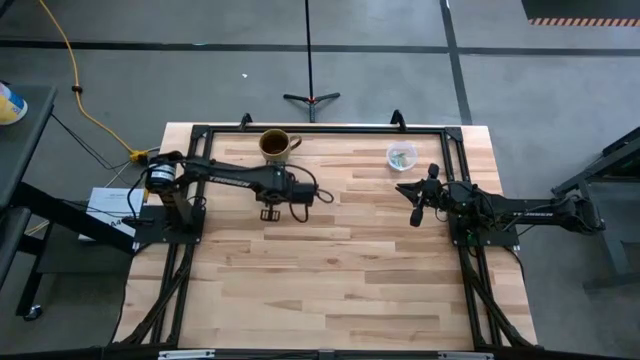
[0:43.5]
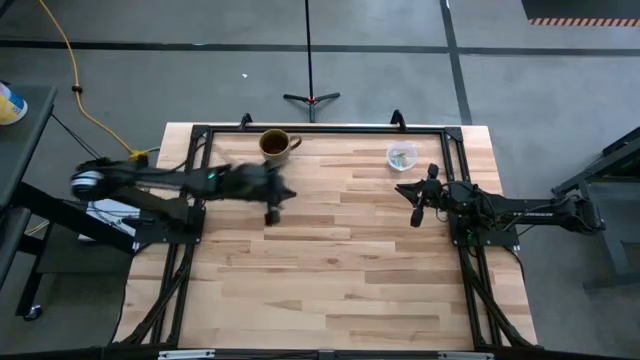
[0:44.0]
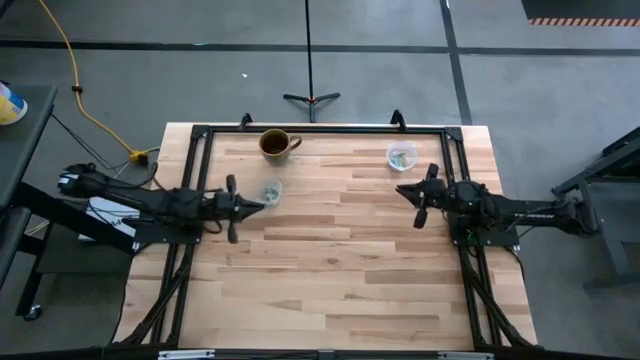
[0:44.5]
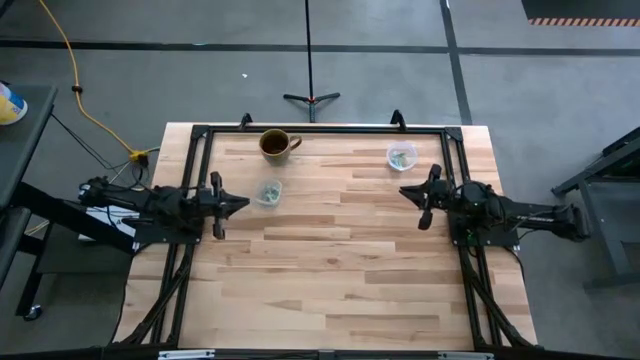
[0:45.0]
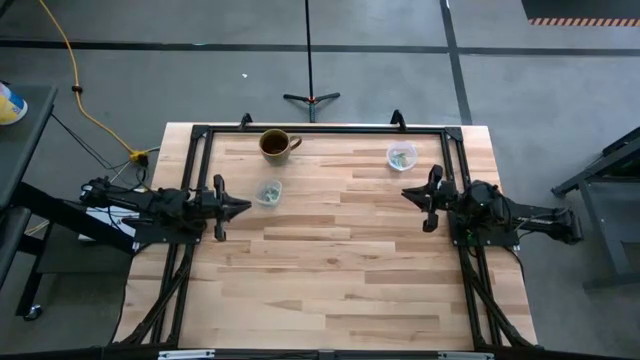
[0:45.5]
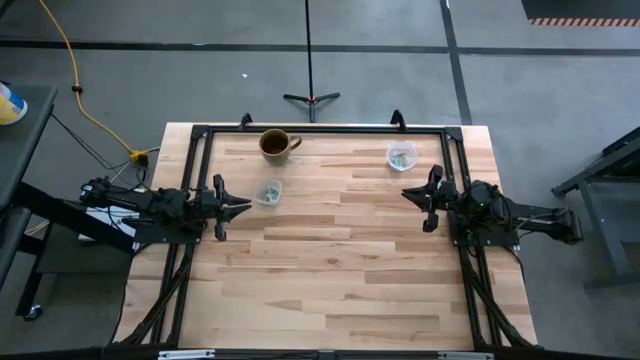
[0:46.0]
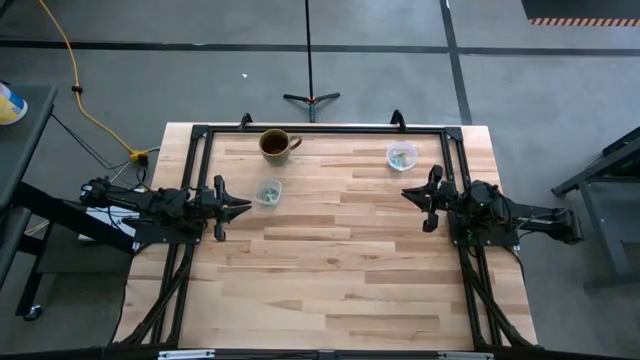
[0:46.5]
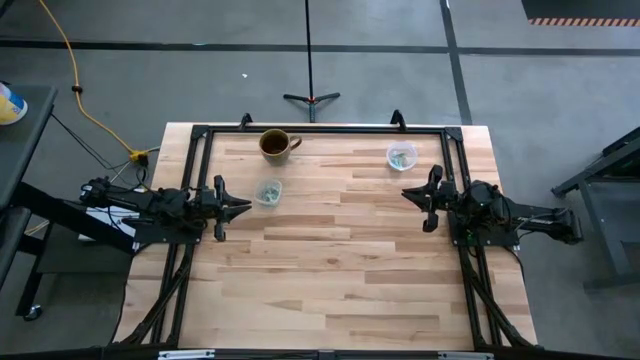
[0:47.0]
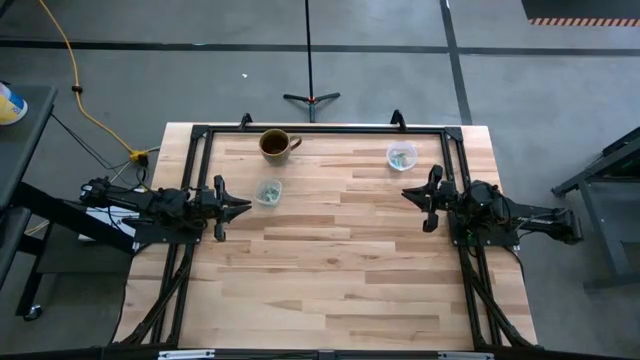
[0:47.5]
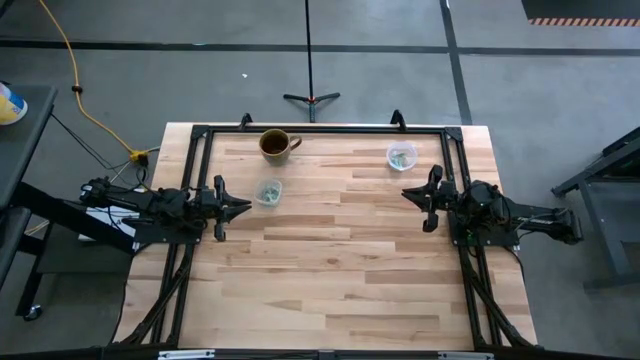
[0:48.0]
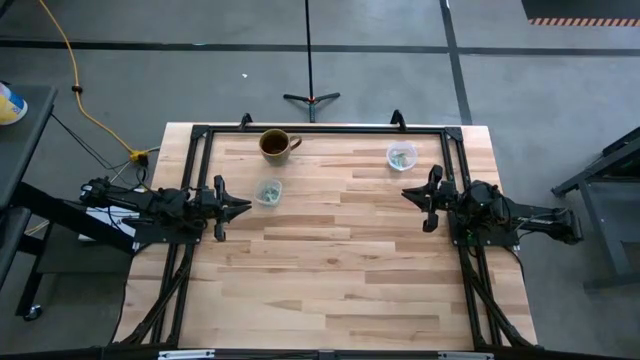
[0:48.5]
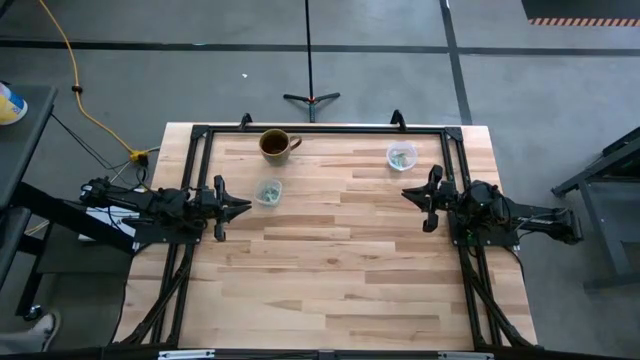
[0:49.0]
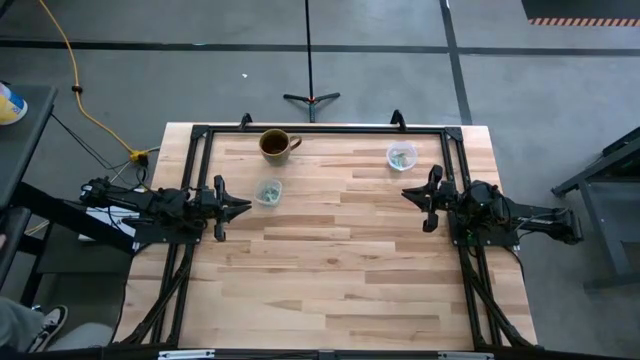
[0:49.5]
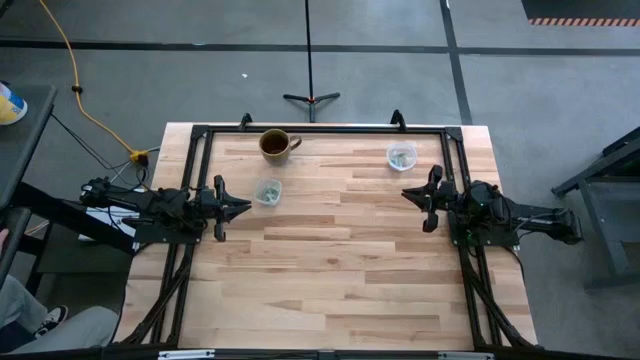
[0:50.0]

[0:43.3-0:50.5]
Task: Pick and place Stevia / Truvia into bins
Return to Home Position

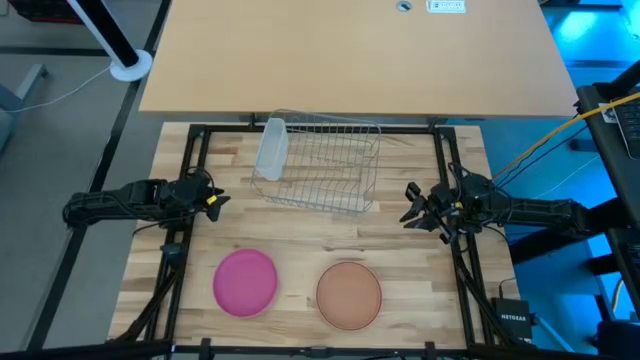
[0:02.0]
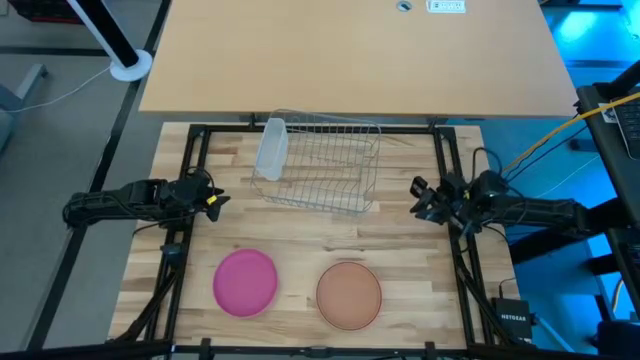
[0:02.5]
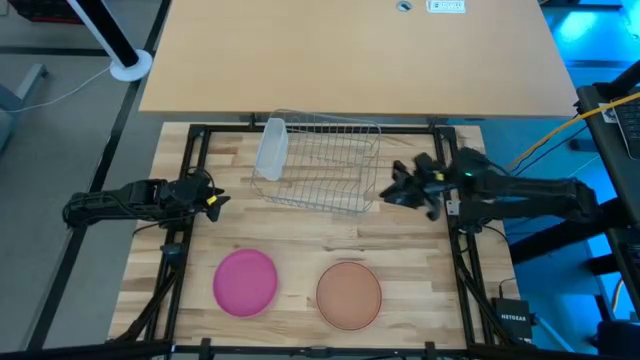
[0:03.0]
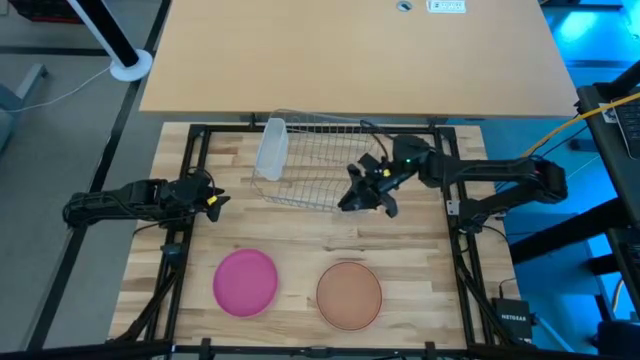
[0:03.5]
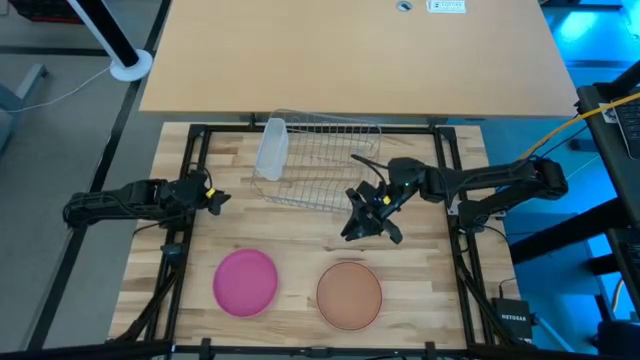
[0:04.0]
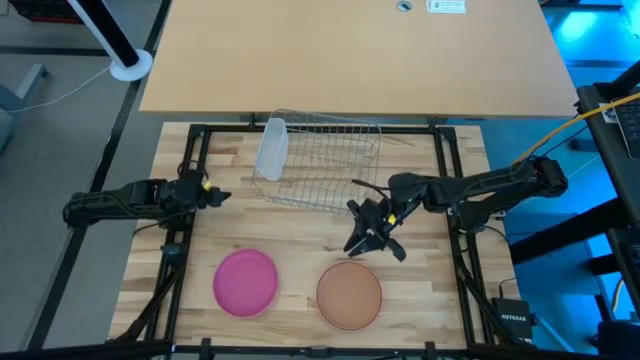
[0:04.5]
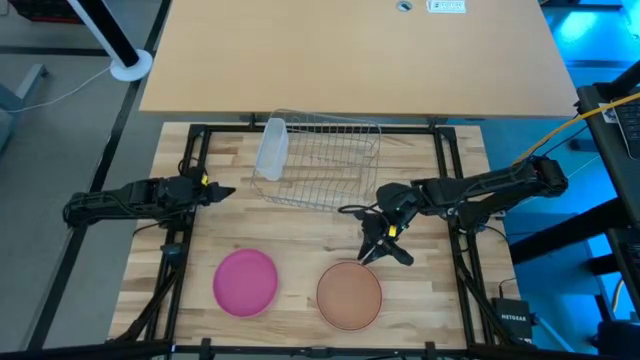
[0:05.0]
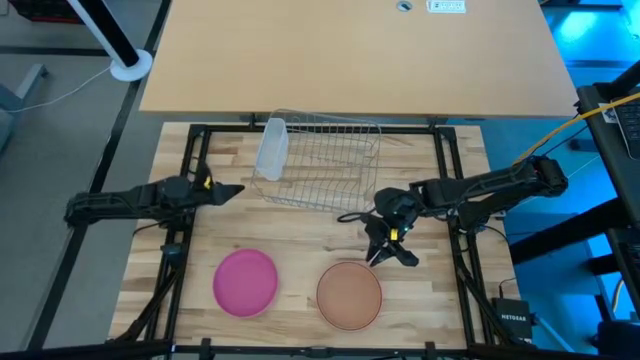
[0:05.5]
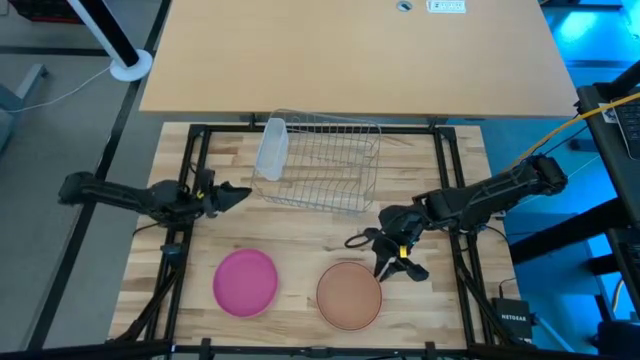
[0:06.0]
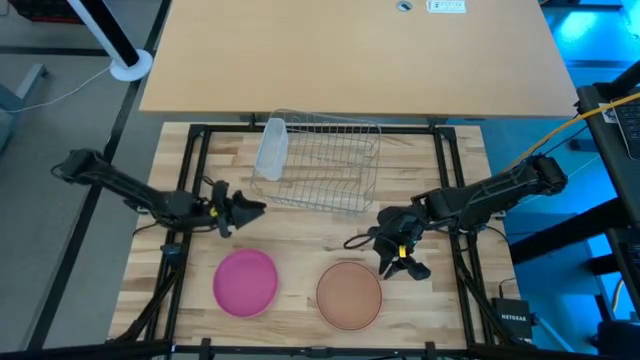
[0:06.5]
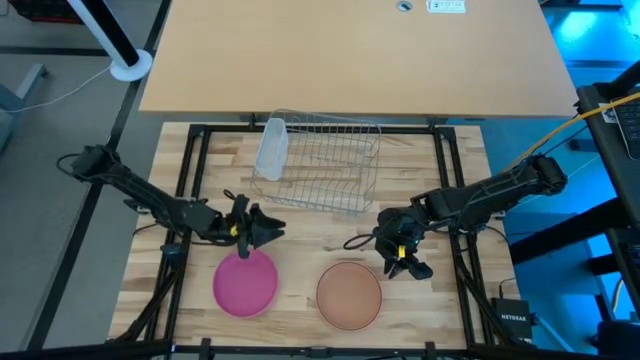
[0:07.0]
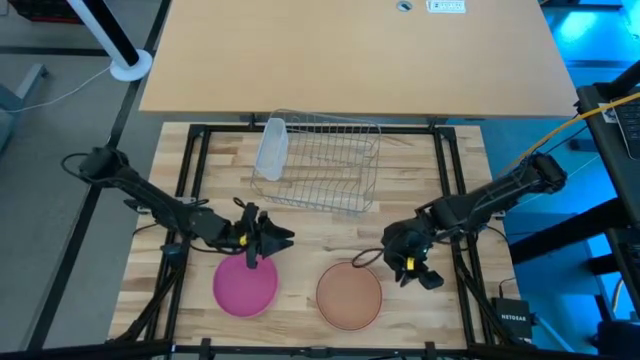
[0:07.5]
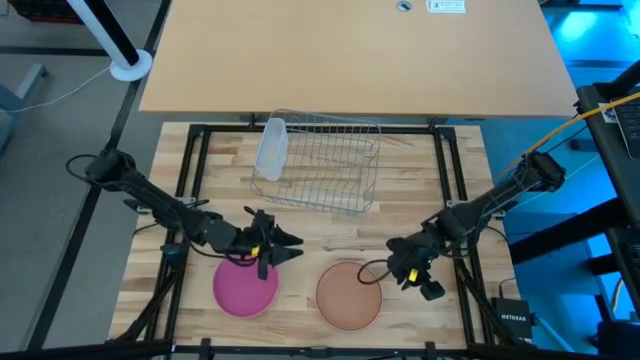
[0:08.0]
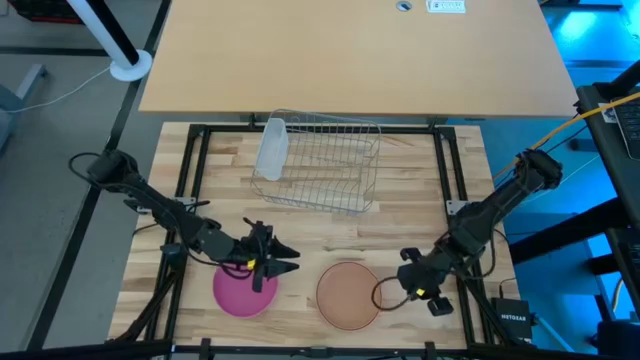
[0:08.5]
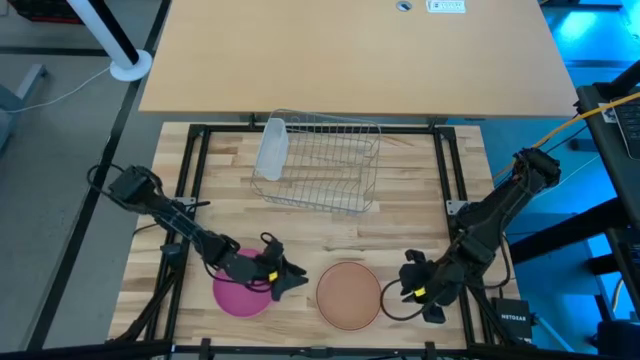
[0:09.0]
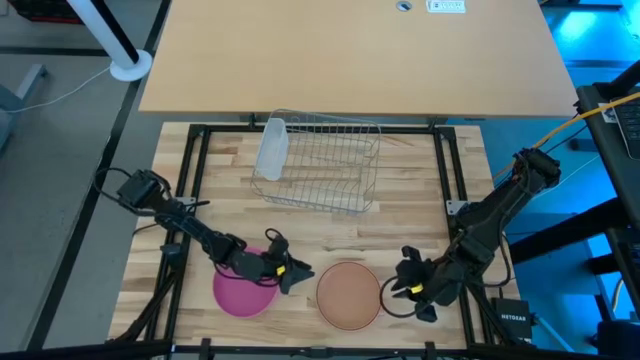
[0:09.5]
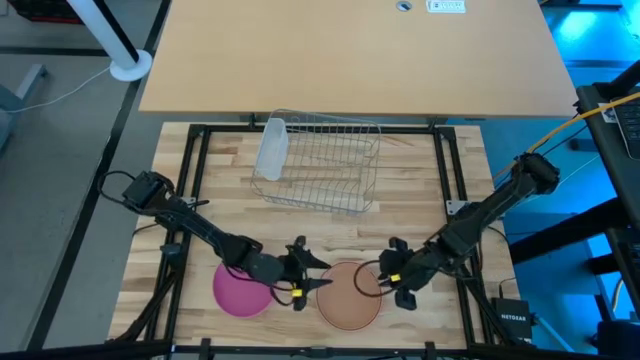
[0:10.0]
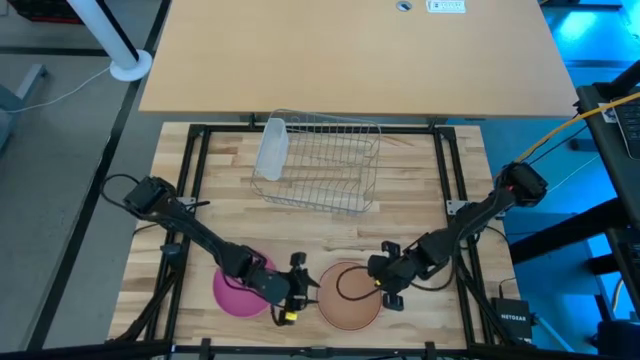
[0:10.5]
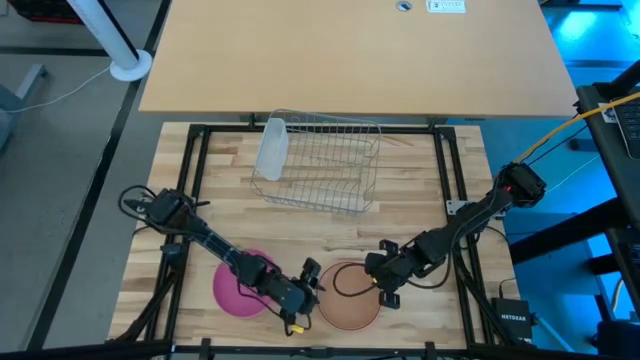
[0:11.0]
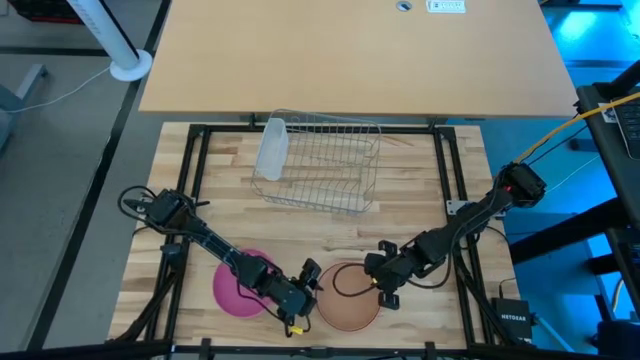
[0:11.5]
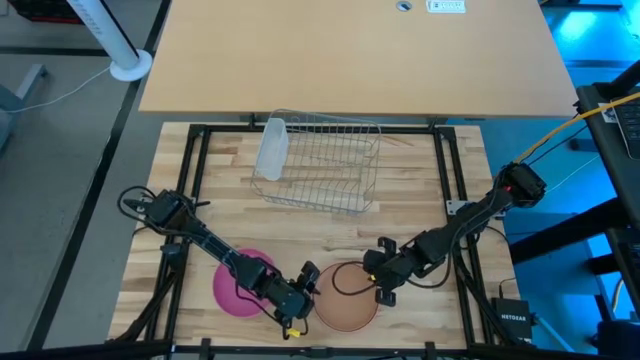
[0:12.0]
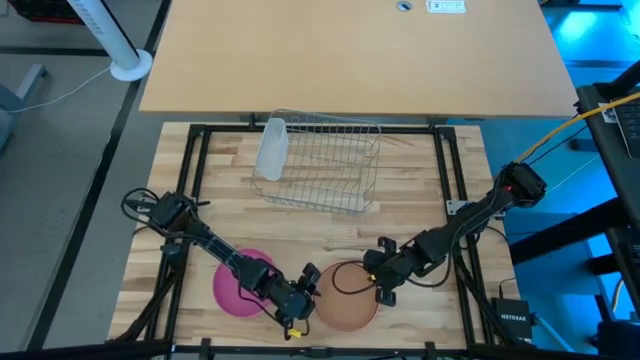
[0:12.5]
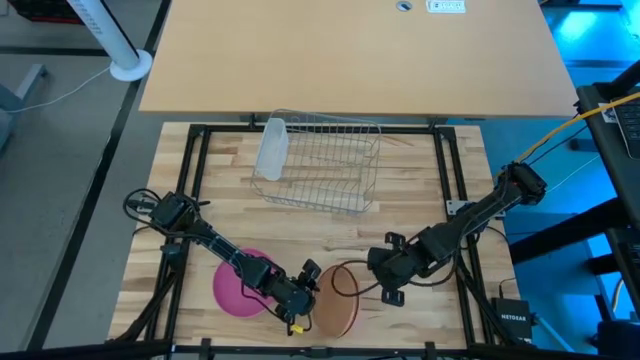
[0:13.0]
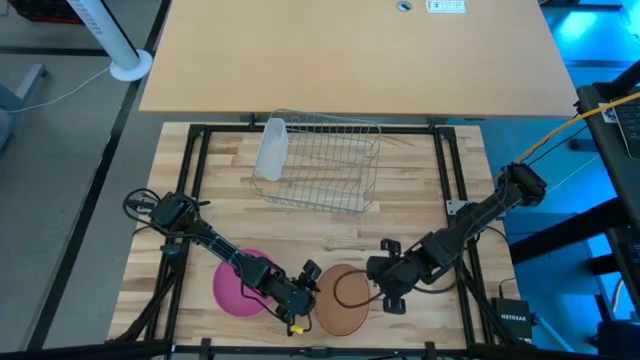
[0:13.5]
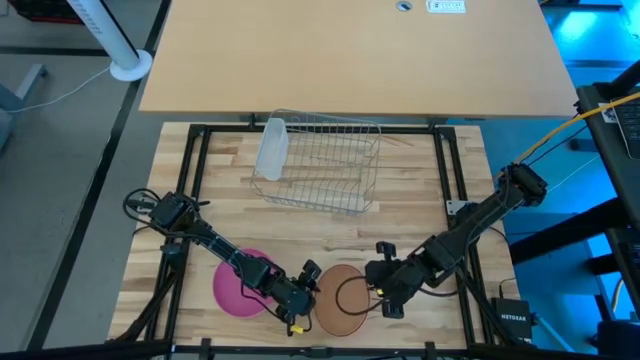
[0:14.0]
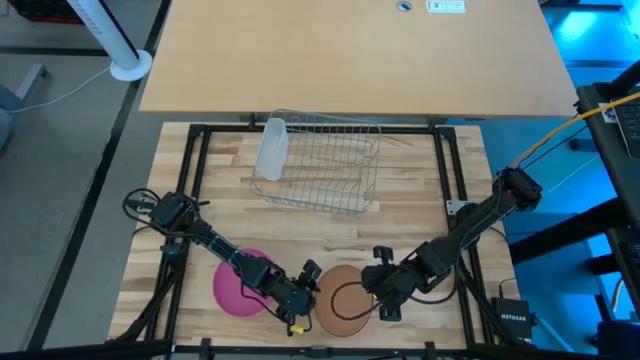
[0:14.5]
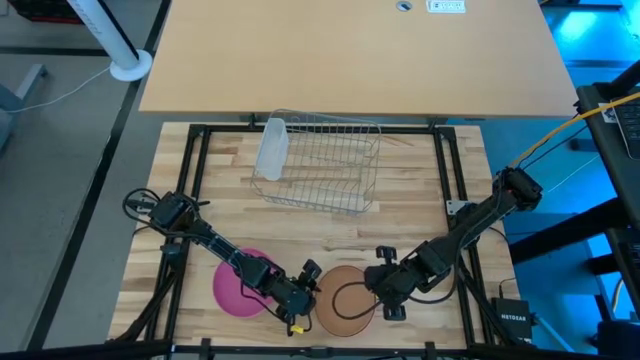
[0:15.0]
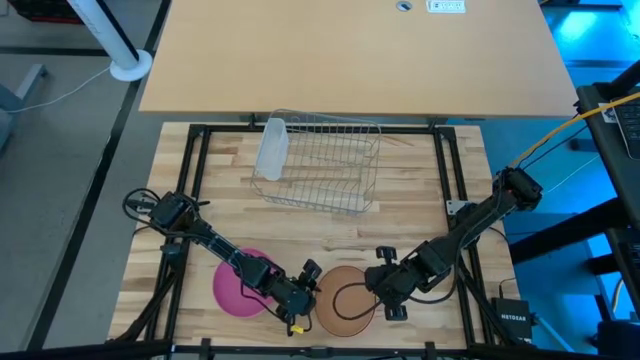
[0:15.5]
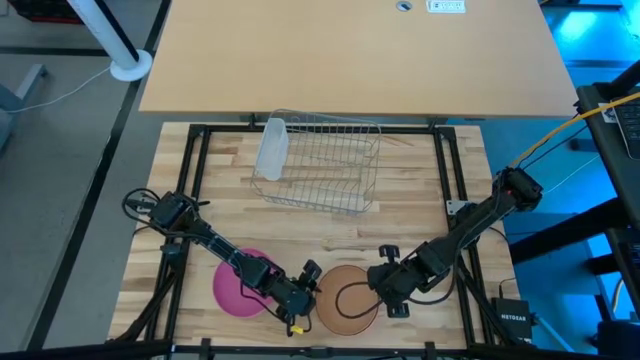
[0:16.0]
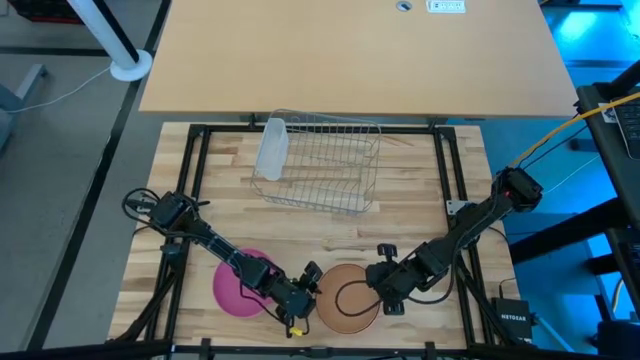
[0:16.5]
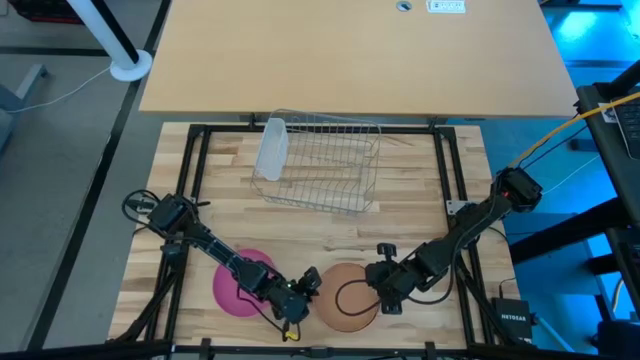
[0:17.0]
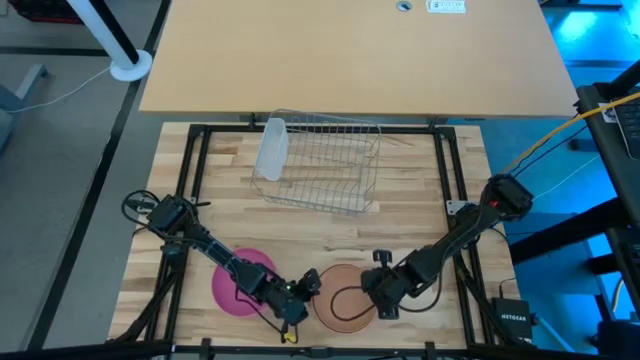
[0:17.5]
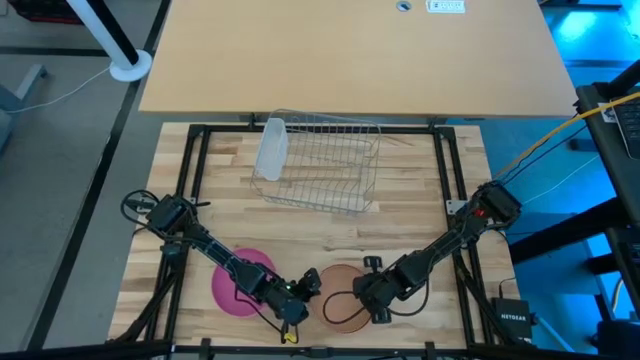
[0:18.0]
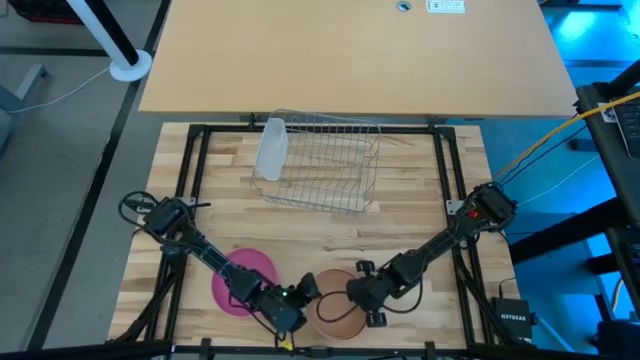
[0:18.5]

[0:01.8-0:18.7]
Task: Sort dishes
Put the light red plate into the dish rack
